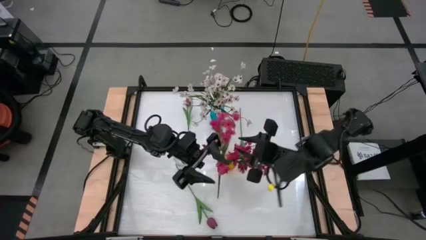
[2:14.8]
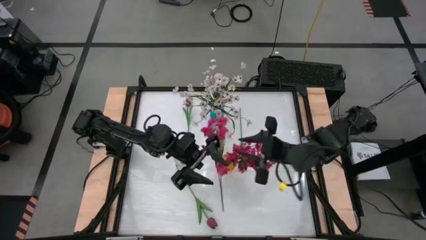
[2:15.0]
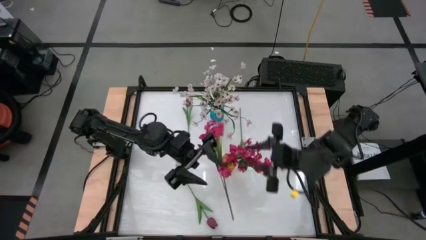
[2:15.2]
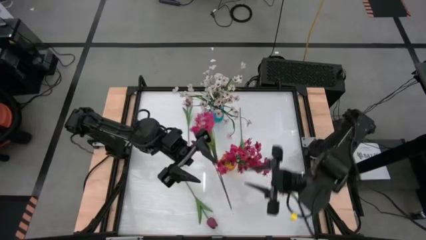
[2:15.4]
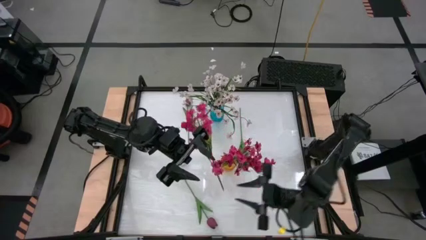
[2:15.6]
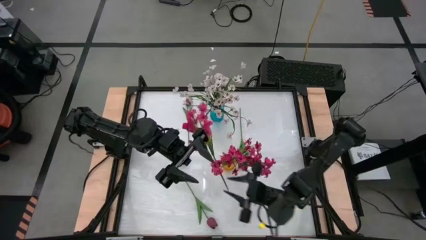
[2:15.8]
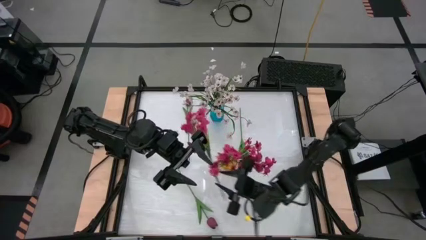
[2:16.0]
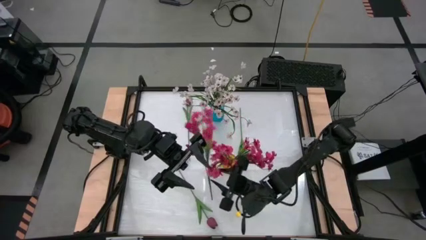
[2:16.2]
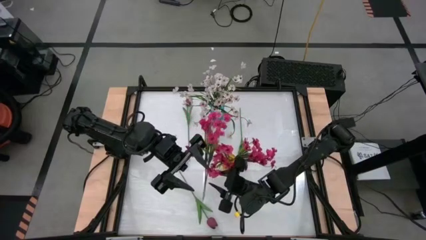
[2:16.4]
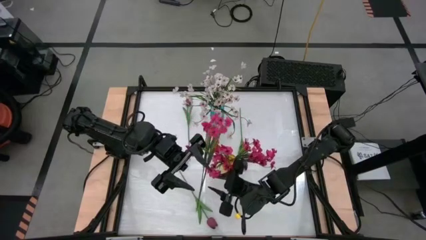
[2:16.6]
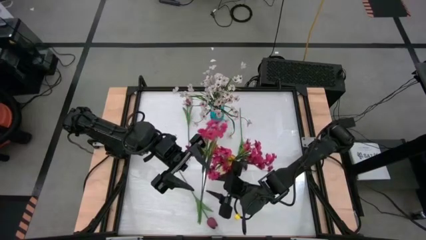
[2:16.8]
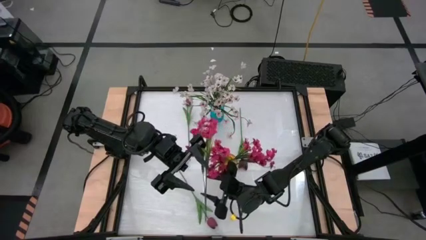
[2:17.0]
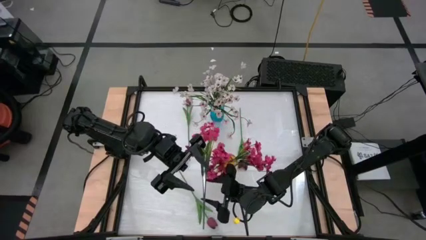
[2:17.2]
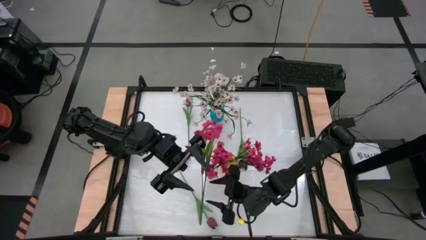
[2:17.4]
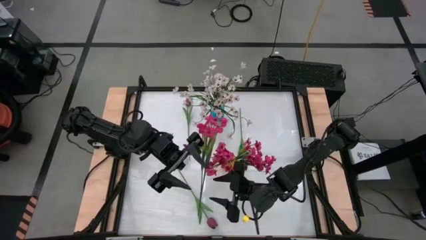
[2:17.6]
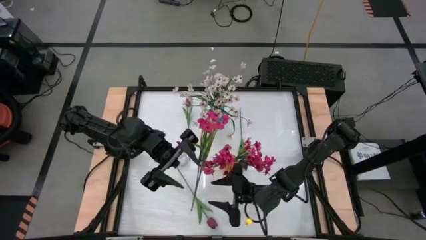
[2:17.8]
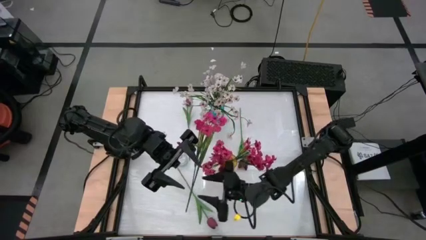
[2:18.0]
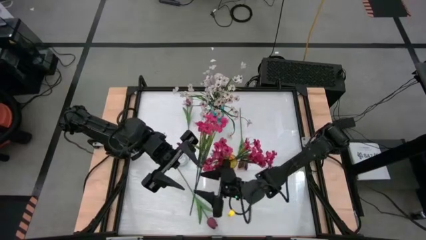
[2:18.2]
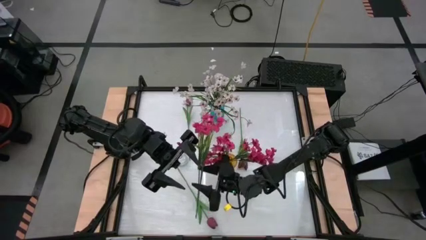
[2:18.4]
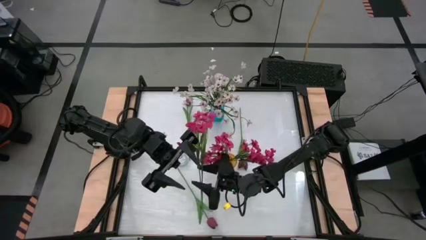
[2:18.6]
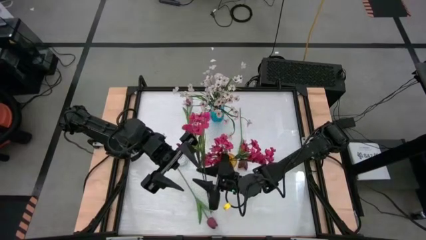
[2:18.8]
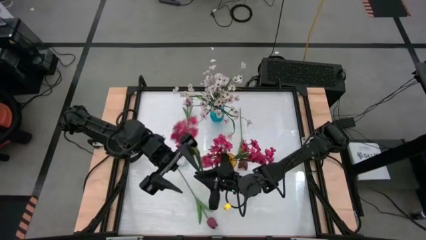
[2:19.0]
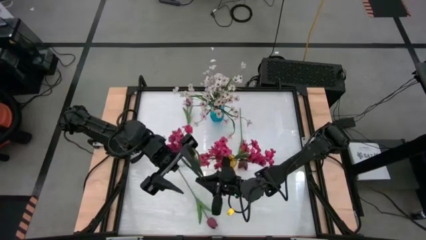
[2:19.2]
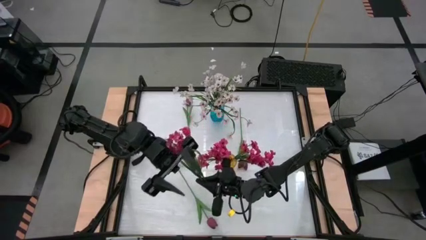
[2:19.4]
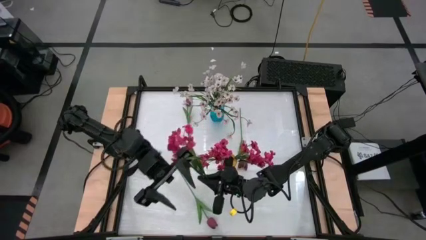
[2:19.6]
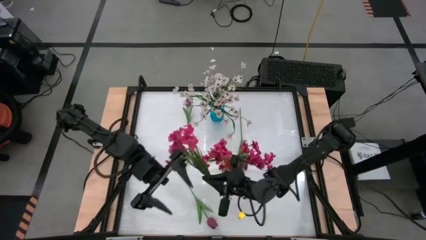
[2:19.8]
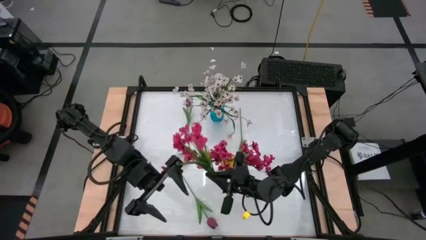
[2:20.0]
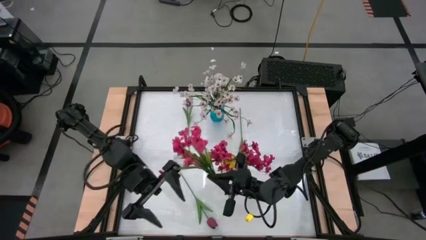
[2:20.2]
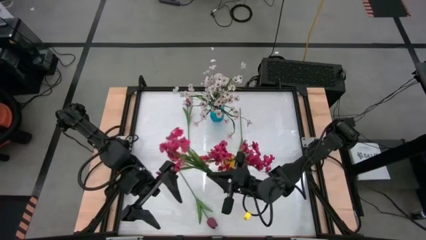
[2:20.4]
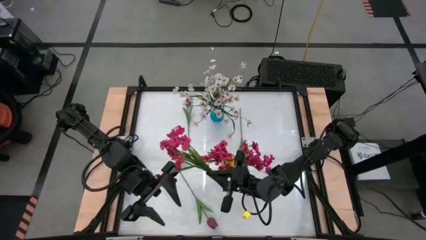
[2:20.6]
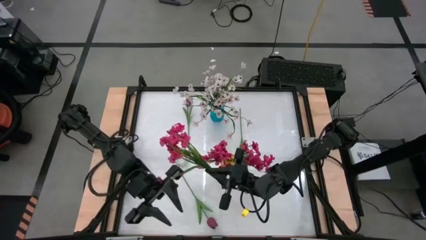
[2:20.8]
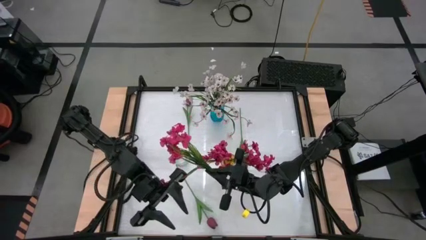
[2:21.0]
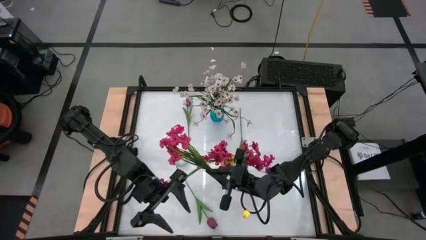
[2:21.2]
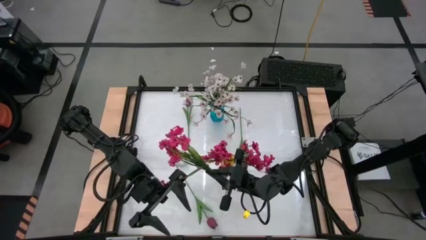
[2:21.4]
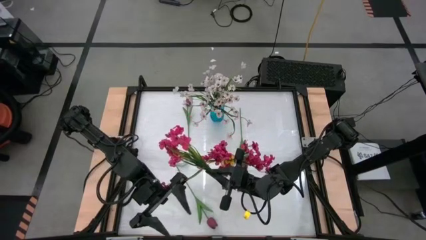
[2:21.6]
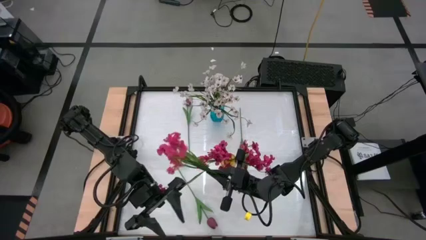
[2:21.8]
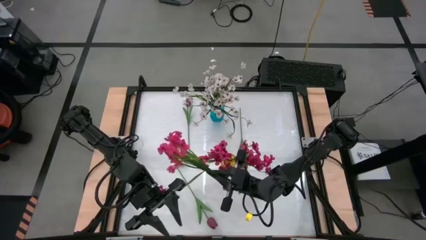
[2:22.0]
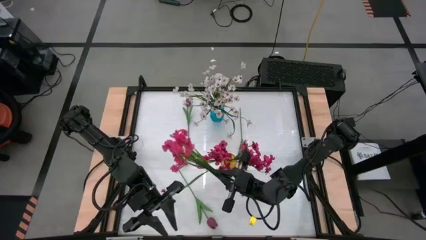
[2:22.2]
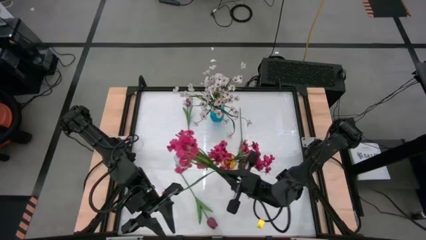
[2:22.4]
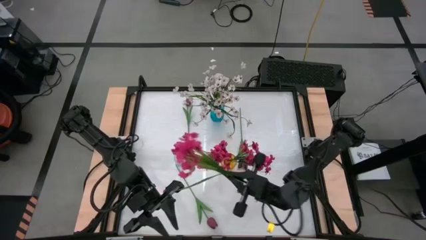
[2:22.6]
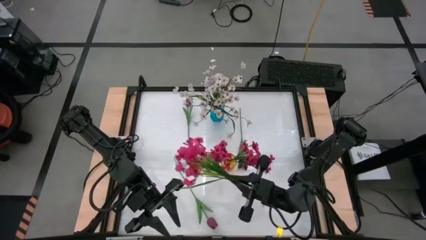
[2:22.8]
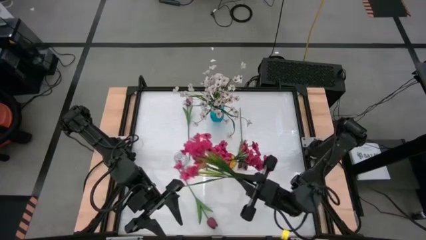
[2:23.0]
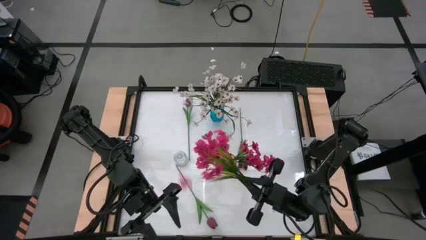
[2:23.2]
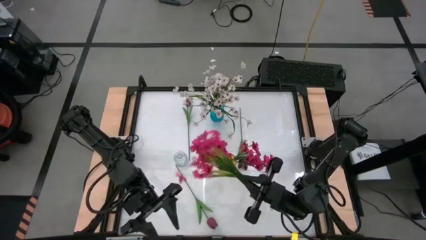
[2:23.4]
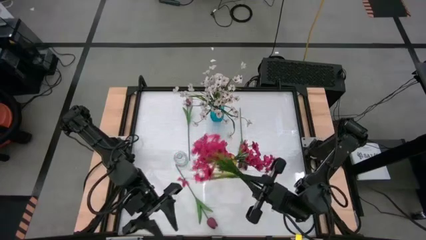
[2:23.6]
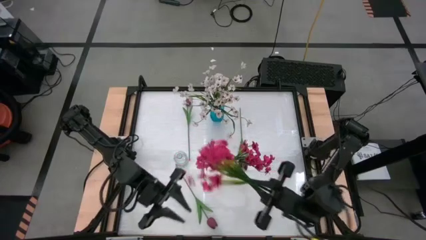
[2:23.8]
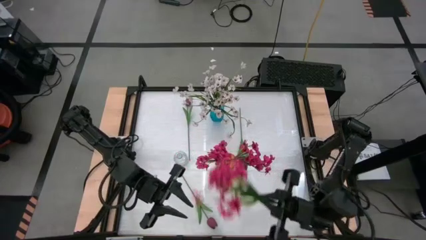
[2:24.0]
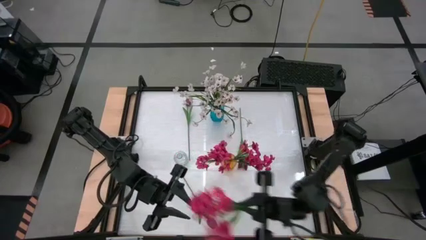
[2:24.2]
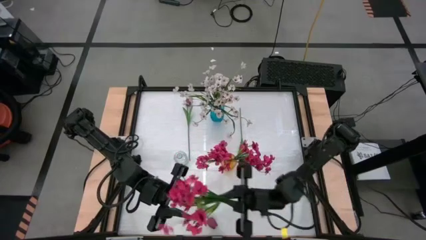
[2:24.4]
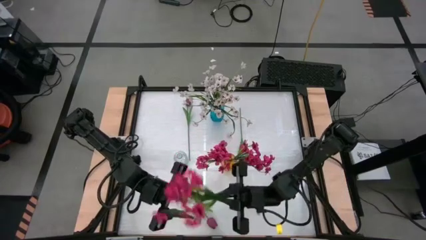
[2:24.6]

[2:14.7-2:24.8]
Task: Sort flowers into vase by color
Put the pink flowers into the yellow vase
